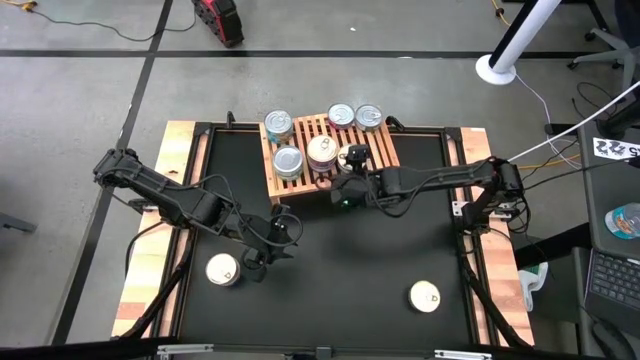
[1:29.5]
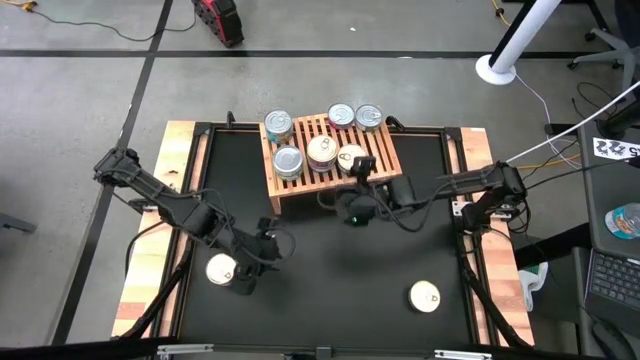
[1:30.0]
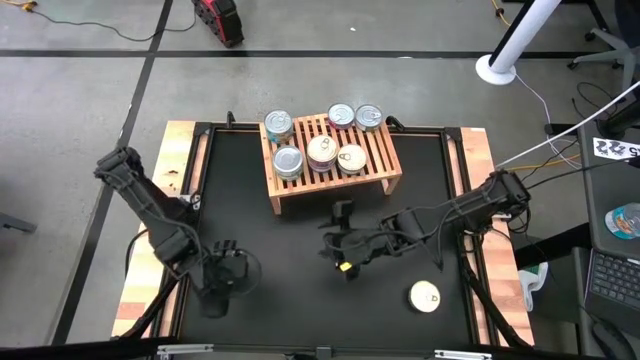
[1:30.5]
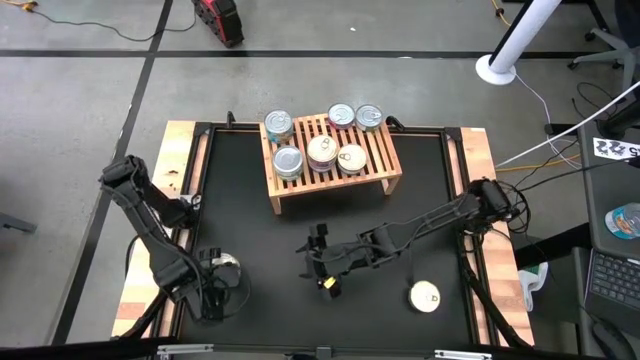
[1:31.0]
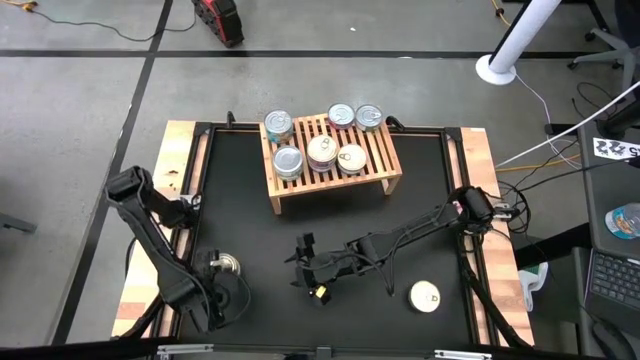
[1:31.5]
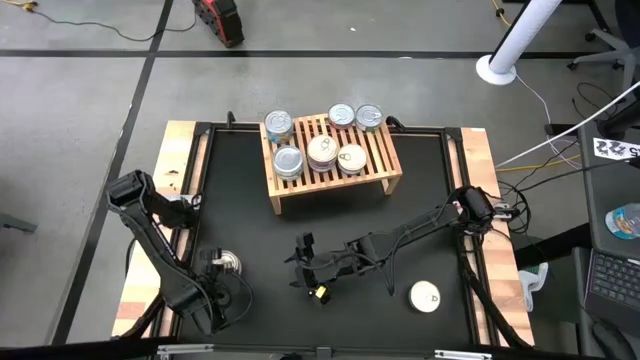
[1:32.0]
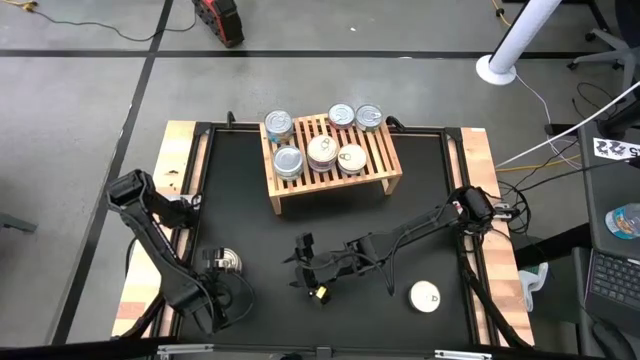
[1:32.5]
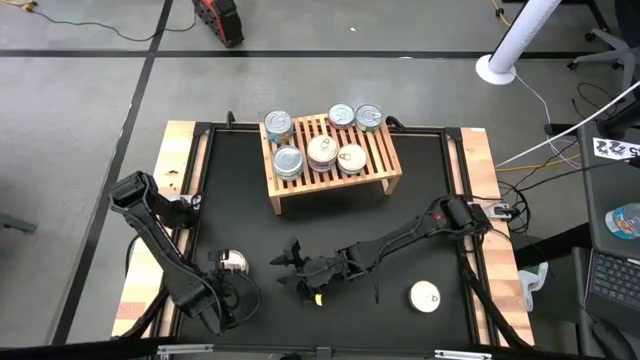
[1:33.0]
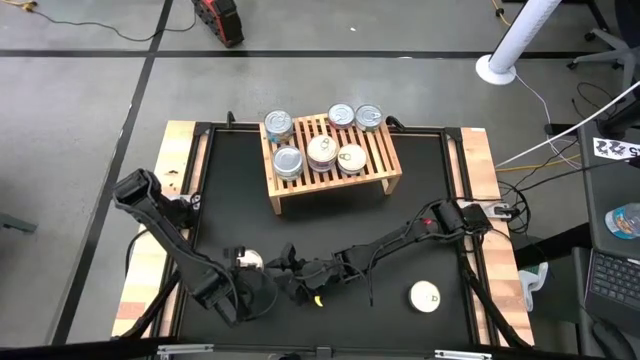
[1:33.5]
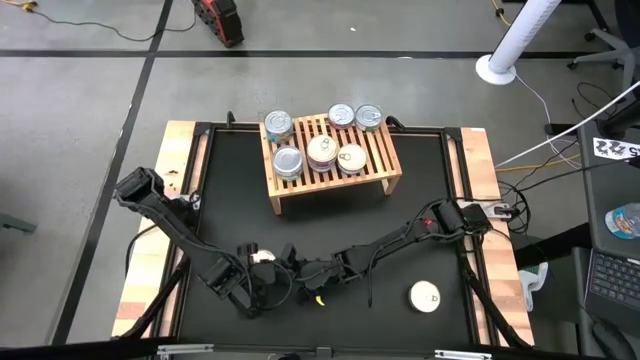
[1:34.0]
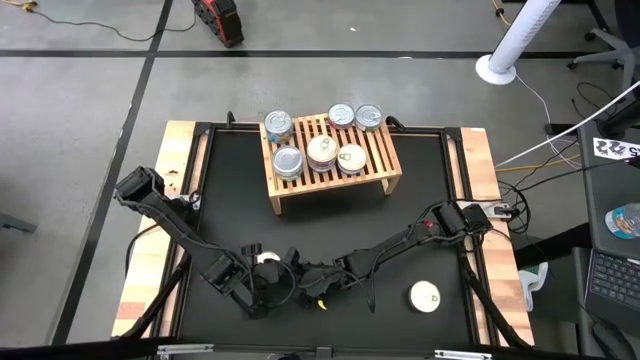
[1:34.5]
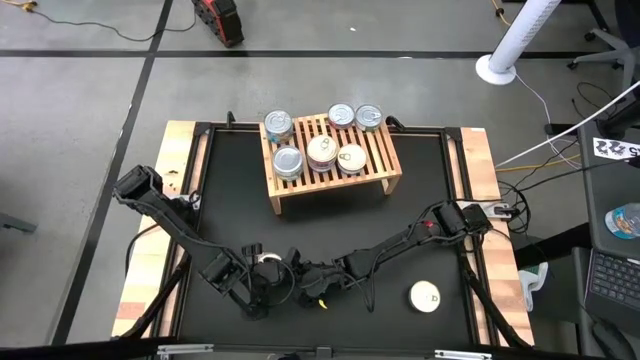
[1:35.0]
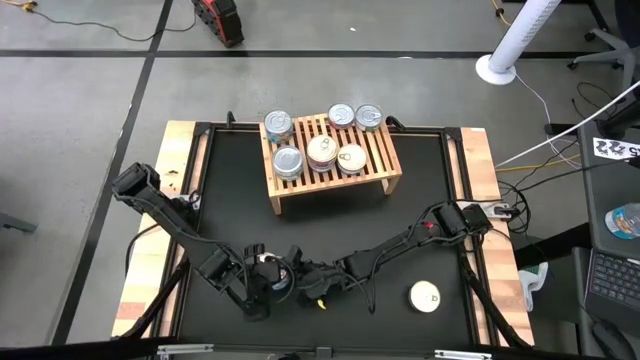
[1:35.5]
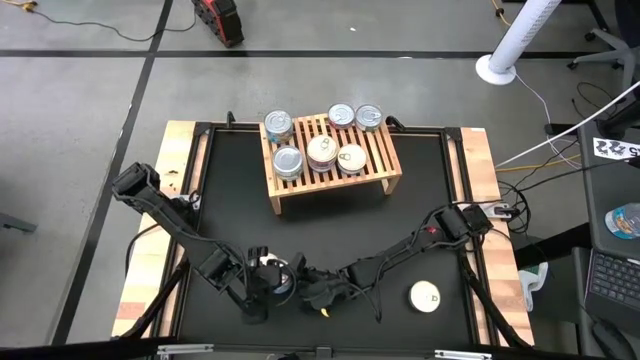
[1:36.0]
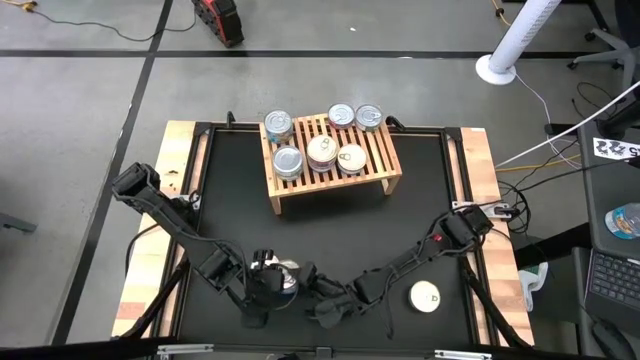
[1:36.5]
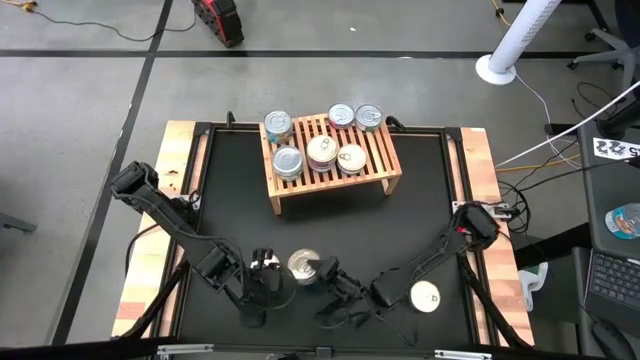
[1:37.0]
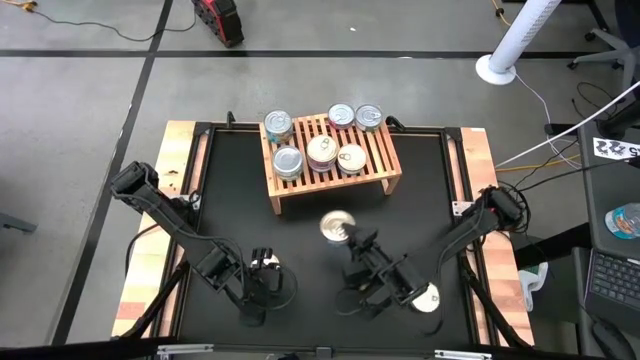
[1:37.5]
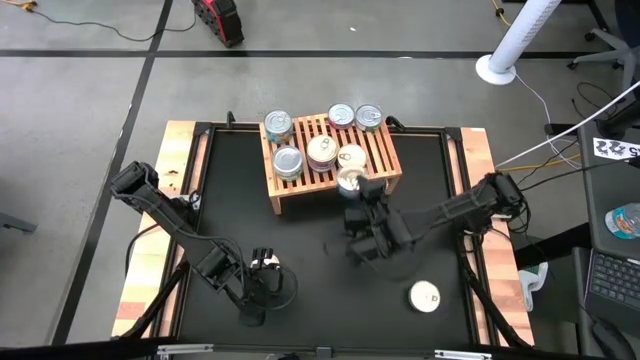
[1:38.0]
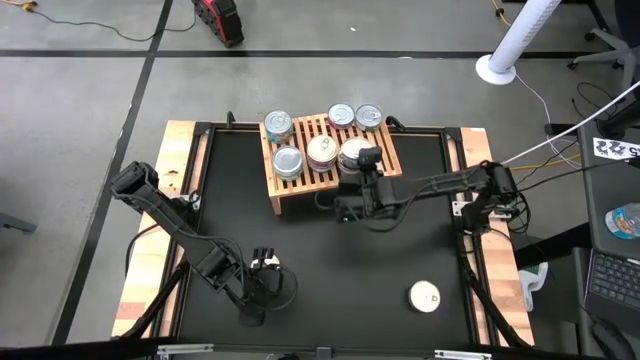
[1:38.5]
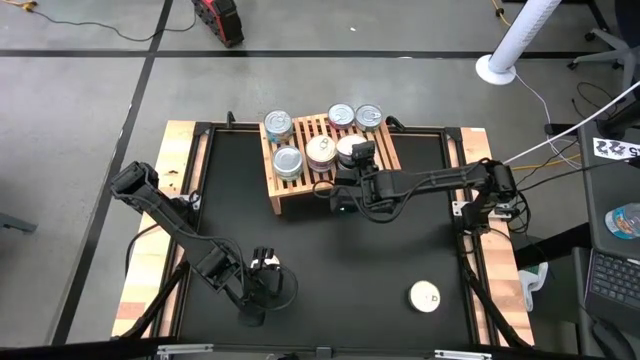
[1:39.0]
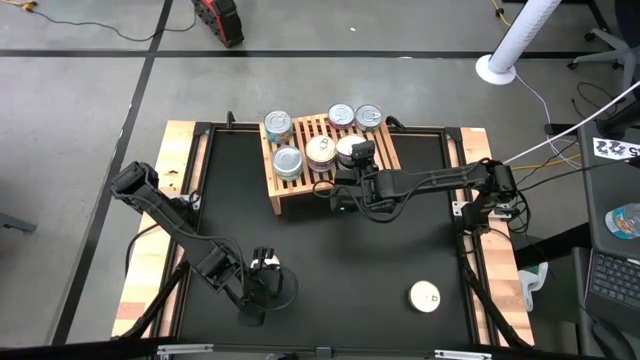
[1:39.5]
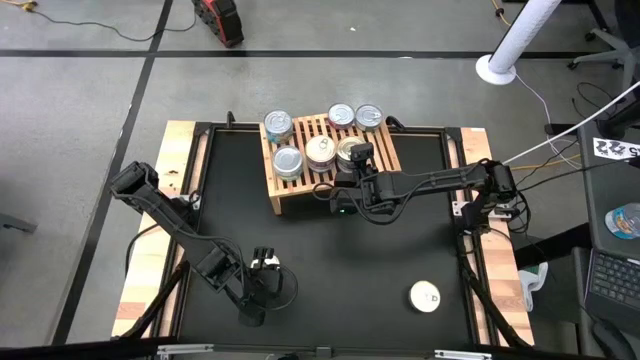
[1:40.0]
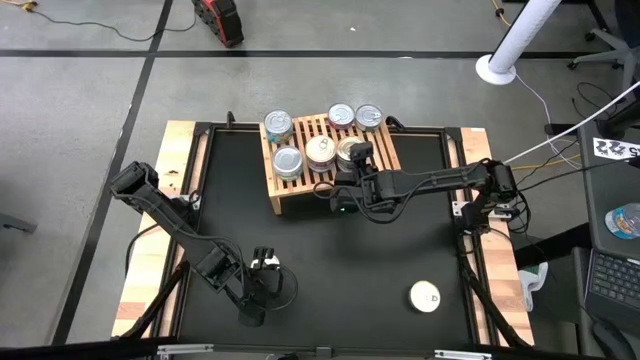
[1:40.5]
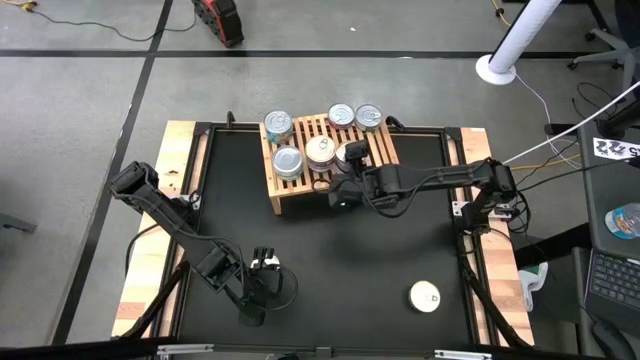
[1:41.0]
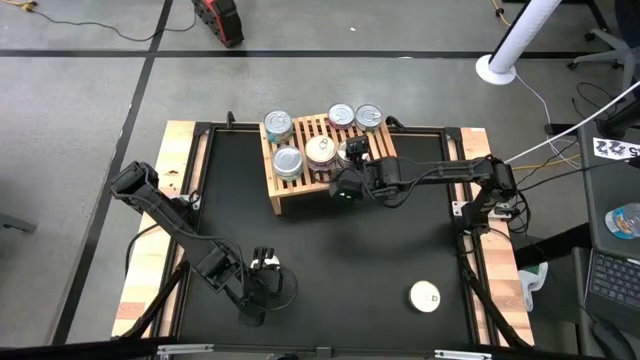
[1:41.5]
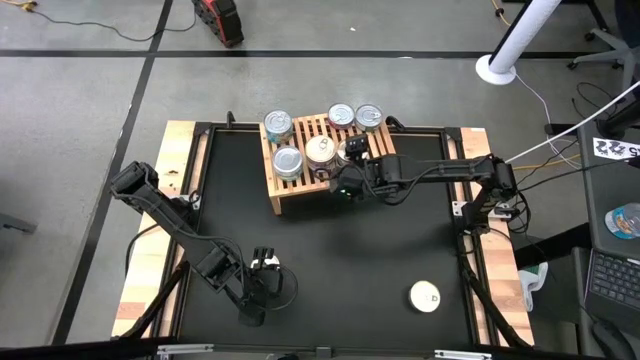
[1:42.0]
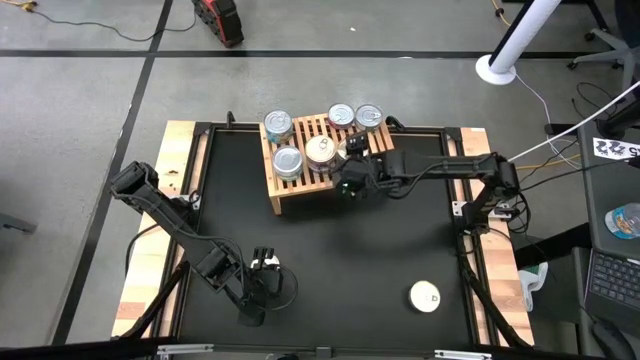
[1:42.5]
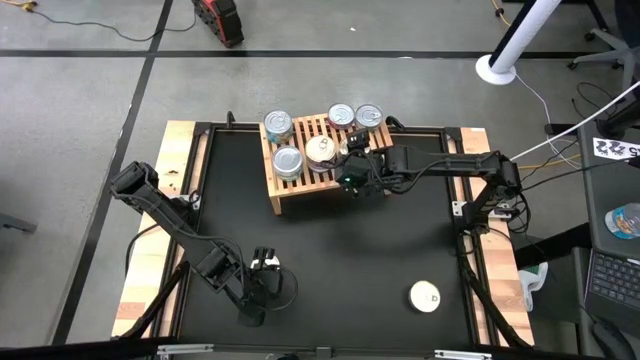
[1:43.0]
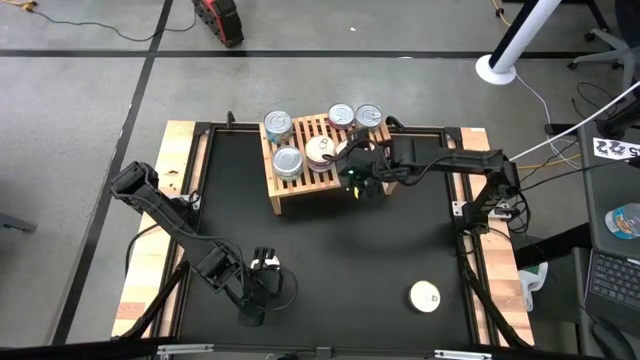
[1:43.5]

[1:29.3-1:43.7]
Task: Stack canned seafood by type on shelf
Put the blue tuna can on the shelf

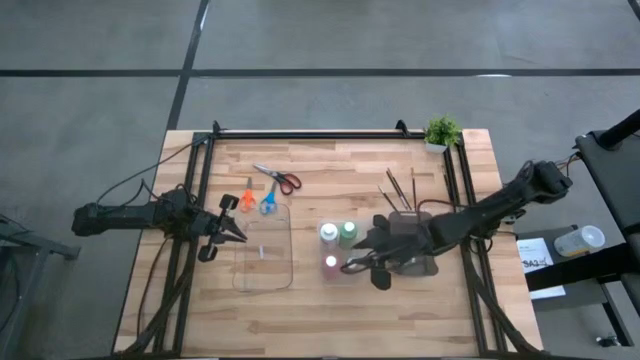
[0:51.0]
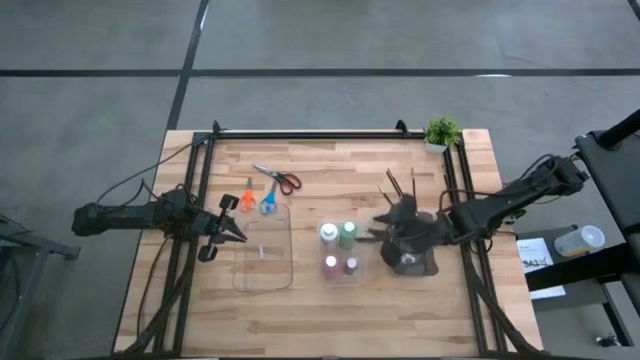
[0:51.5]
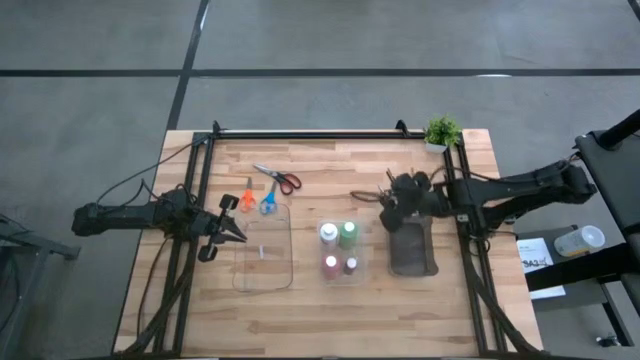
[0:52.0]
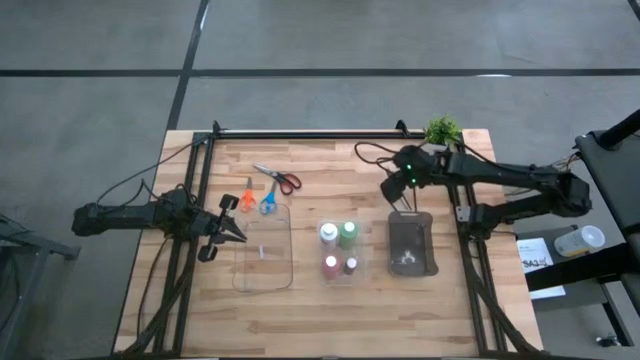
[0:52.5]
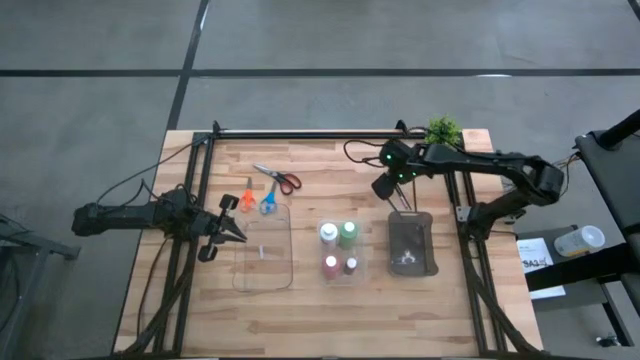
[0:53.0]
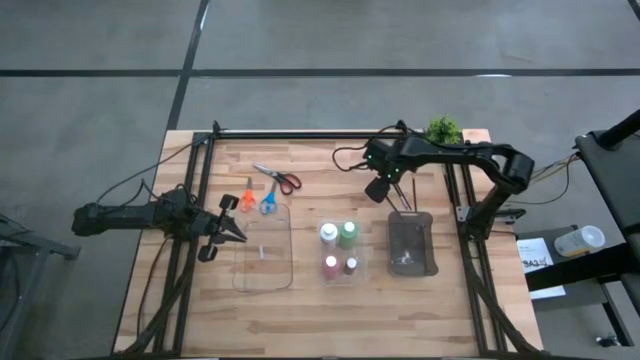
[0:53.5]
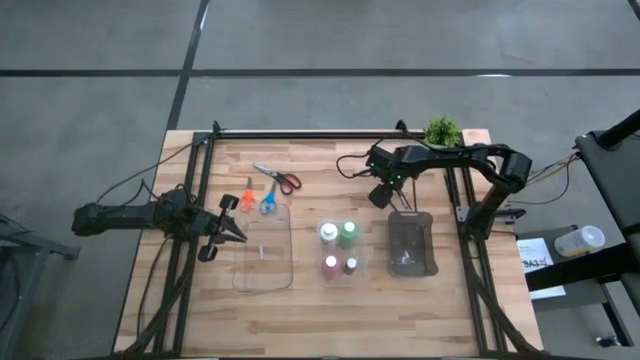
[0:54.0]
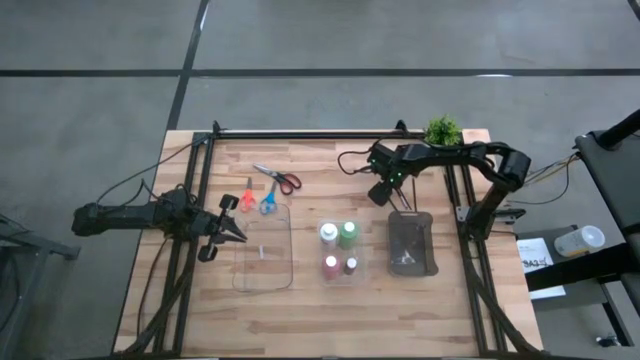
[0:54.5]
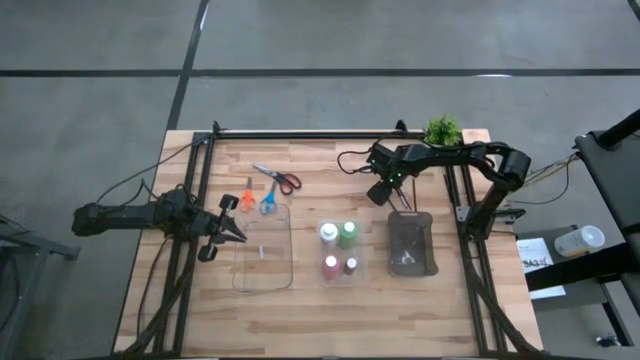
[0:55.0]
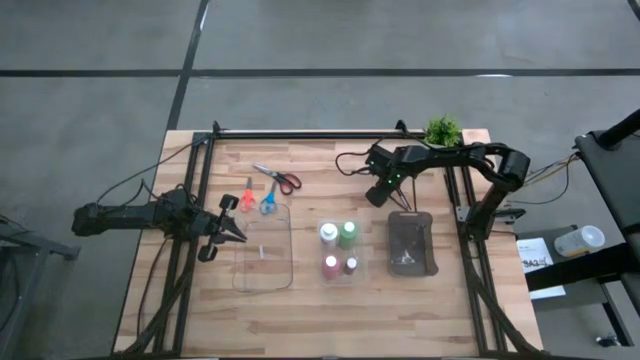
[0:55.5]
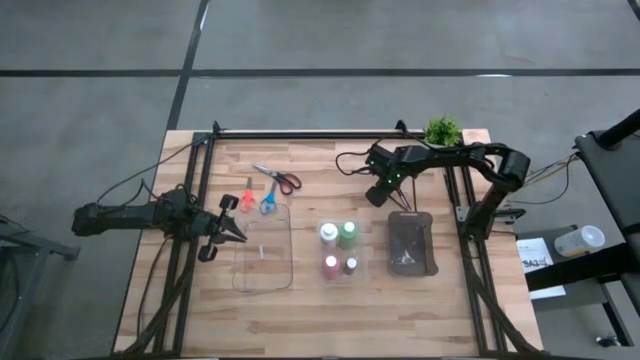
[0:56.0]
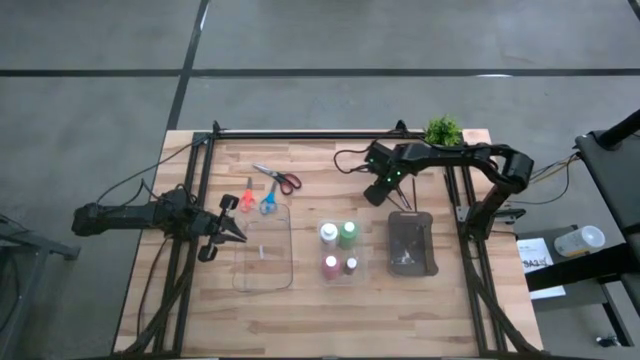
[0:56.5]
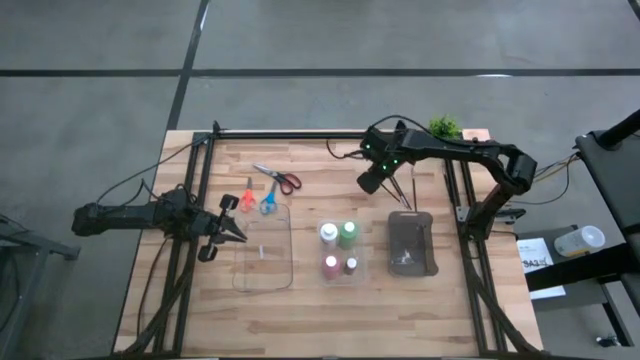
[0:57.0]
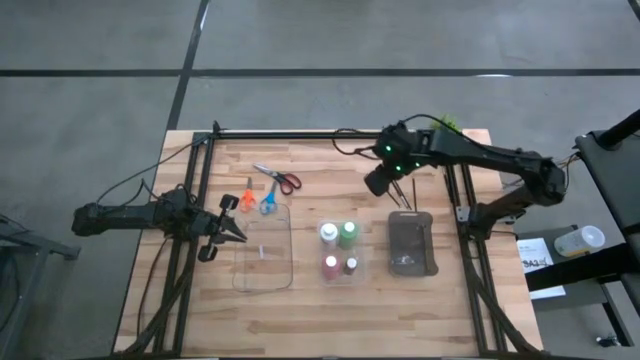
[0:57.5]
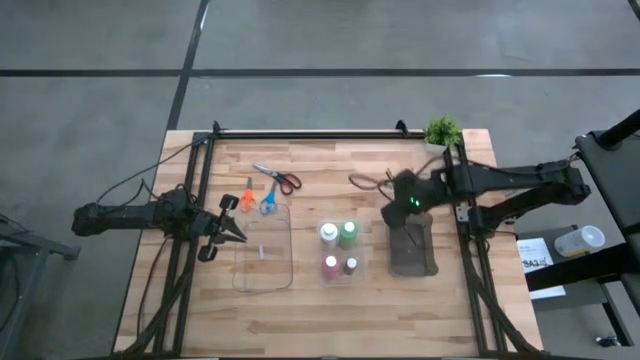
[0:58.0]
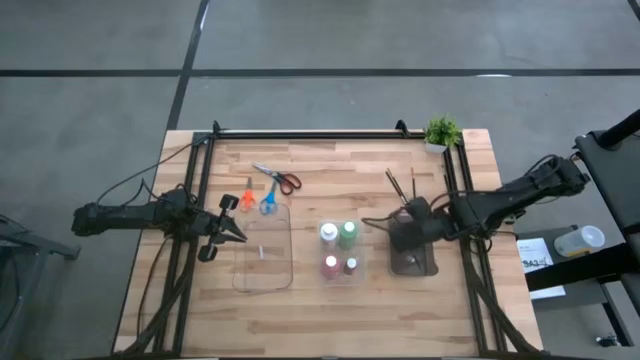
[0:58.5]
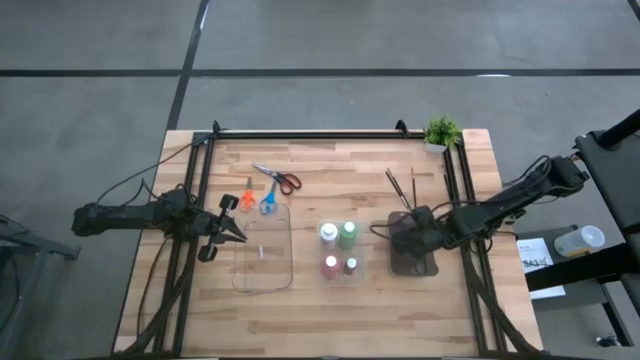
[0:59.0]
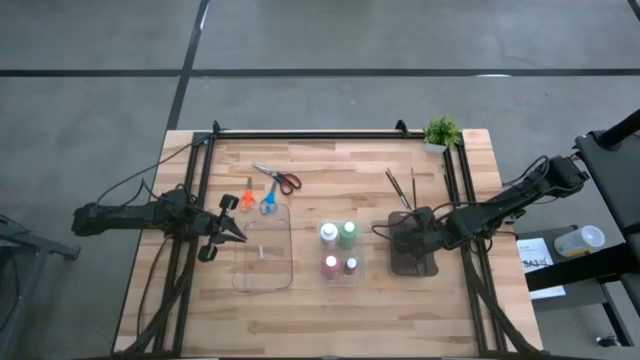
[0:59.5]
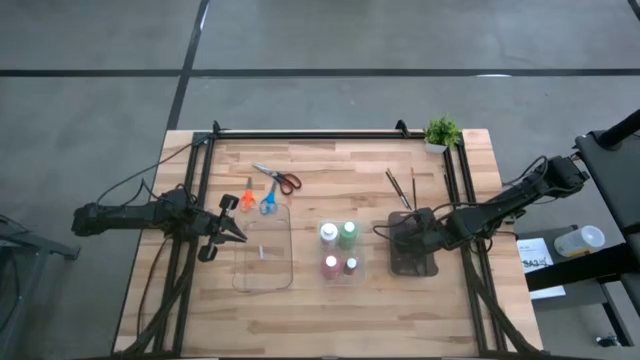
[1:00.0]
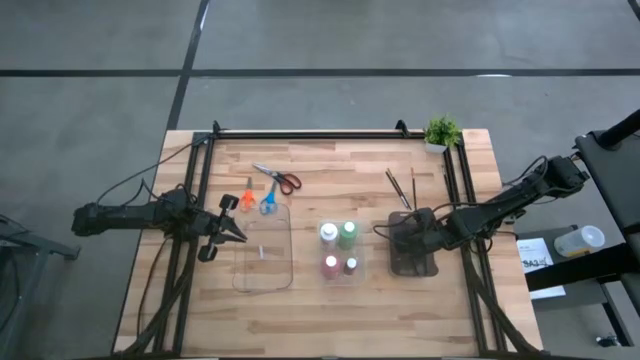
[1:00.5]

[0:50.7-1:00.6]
Task: Pick & Place Paint Supplies
Put the left silver paintbrush into the black bin
